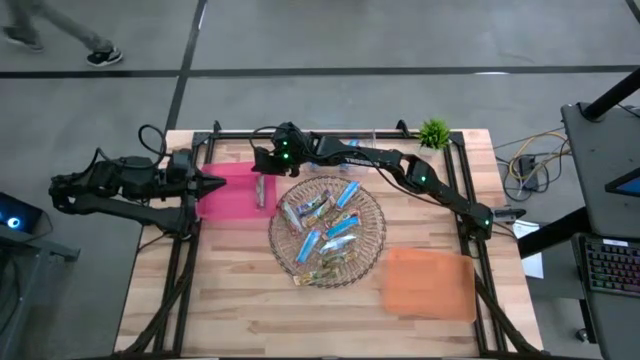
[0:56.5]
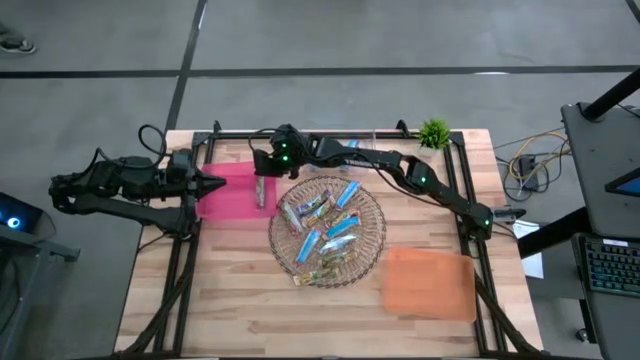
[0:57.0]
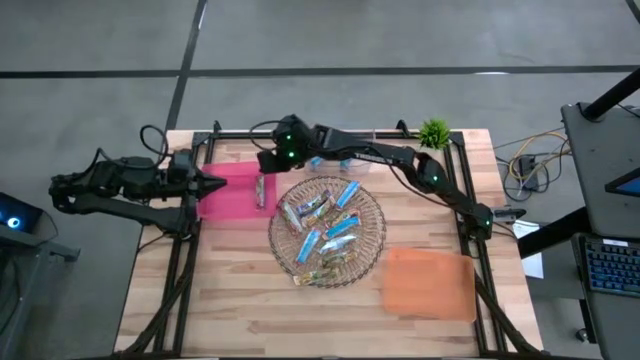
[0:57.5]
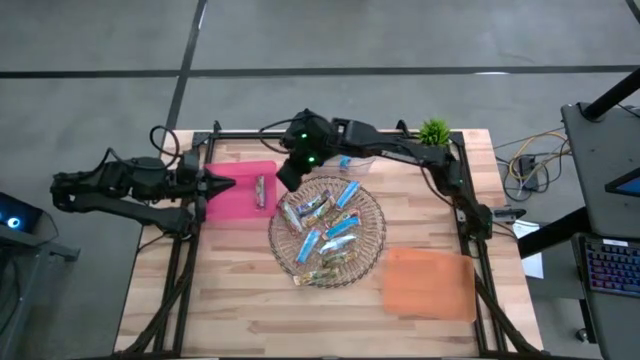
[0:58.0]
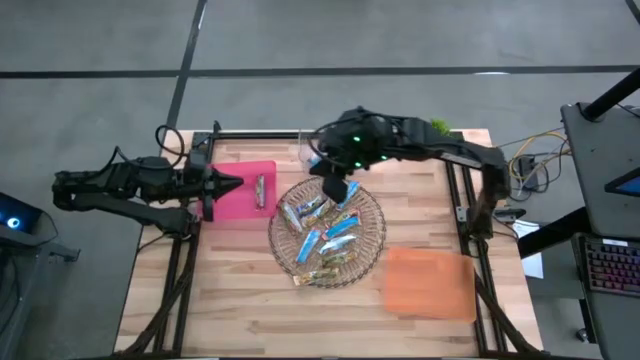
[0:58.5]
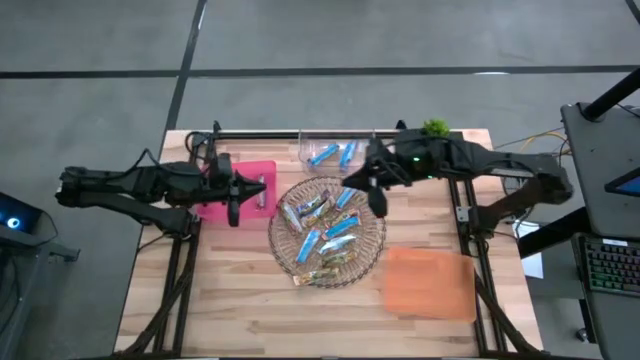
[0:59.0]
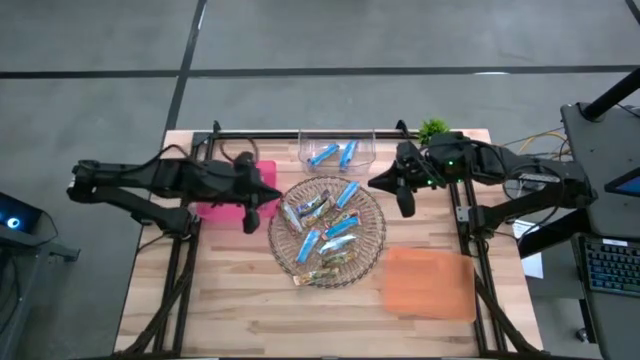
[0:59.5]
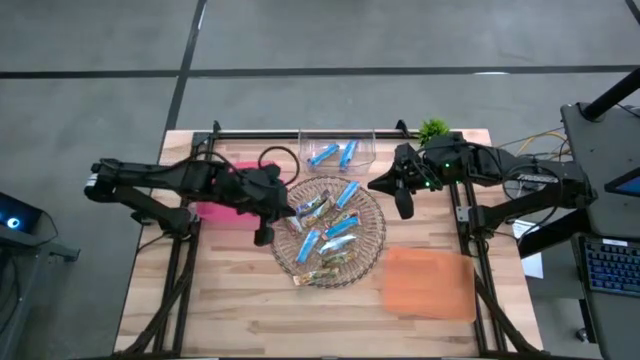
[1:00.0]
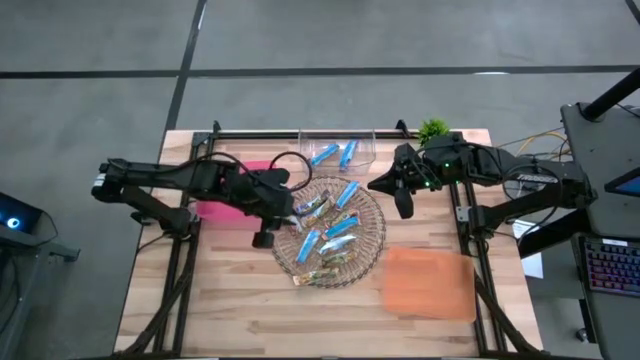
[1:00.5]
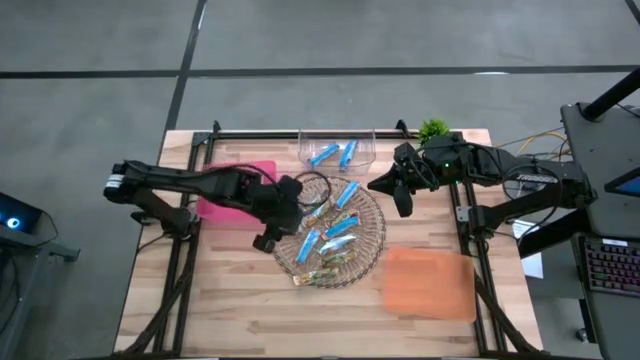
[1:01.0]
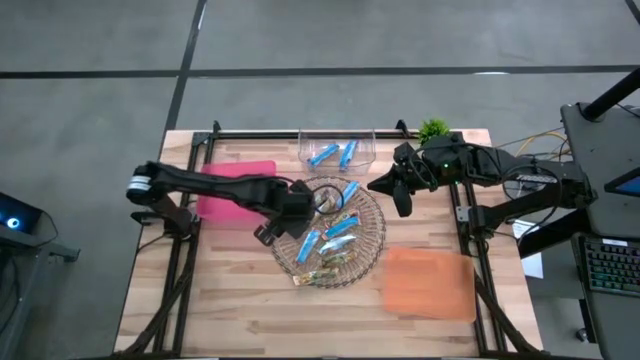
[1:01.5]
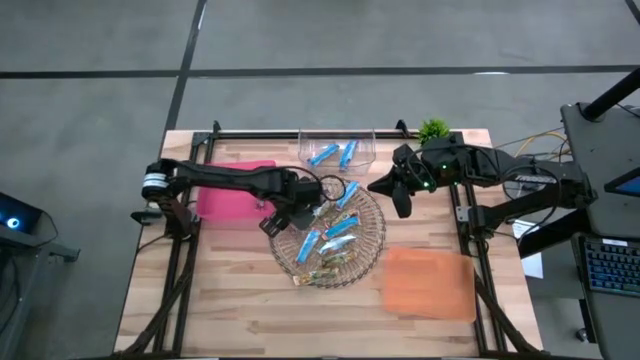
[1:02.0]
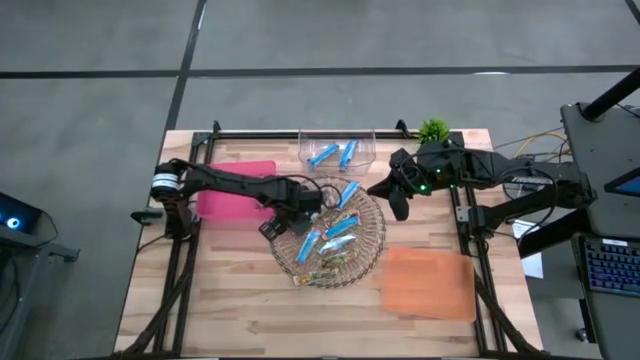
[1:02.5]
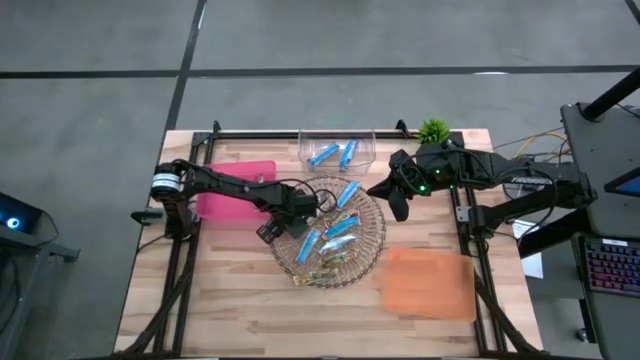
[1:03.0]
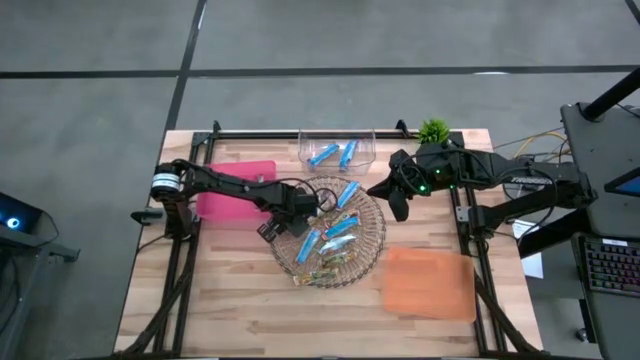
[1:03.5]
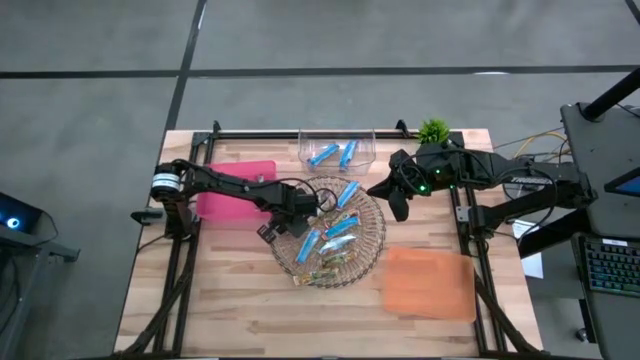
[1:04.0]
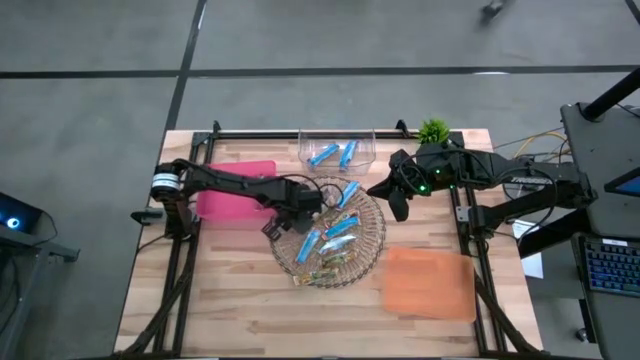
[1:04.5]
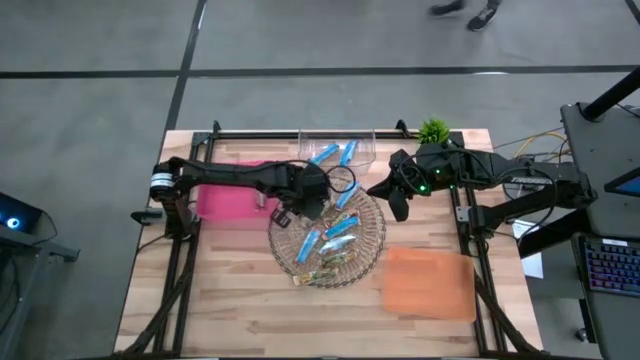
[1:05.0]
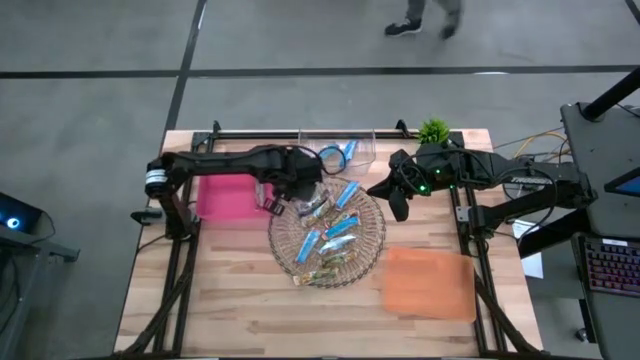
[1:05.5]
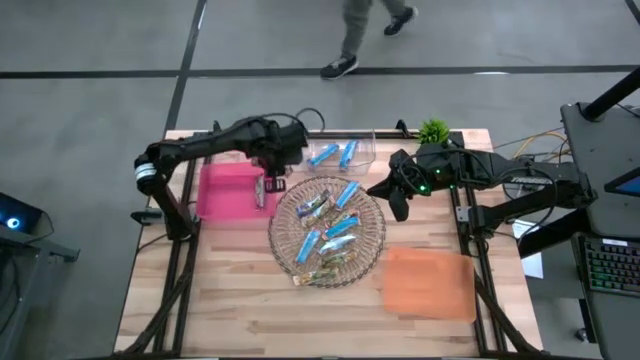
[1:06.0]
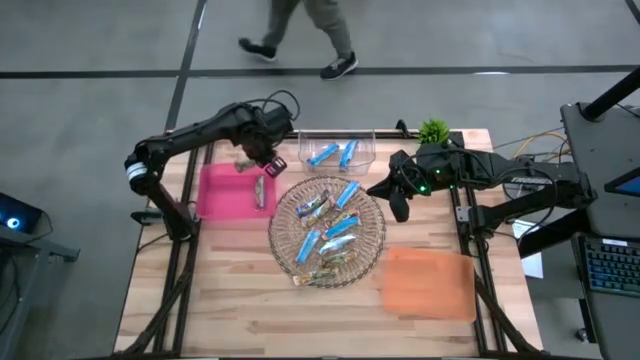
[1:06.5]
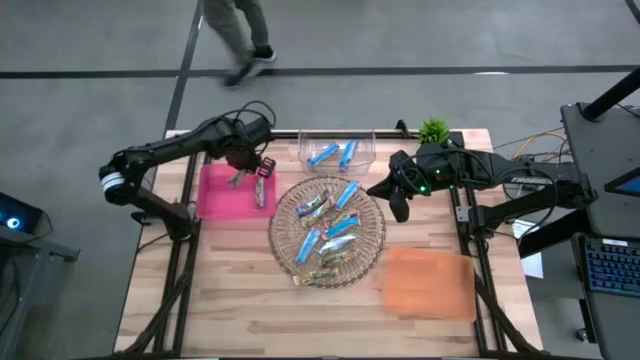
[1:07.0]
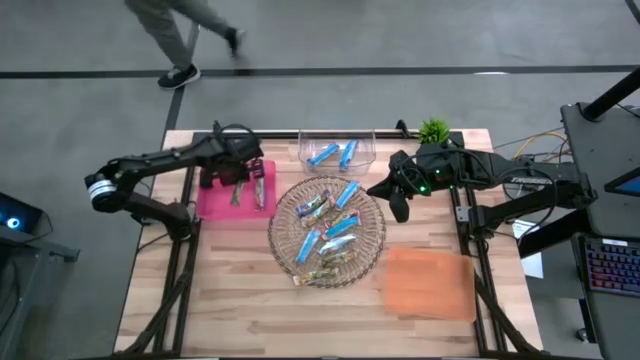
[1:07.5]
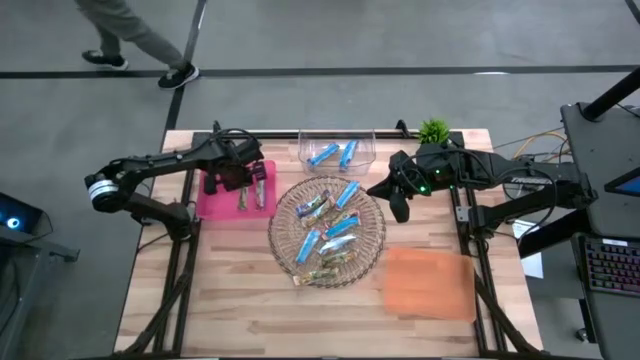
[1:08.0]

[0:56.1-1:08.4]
Task: Pick and place Granola Bars by type
Put the red granola bar into the red bin

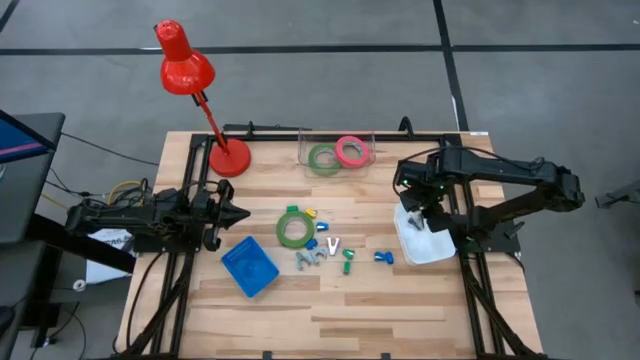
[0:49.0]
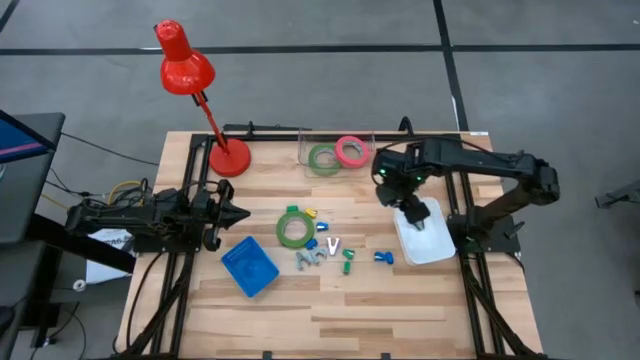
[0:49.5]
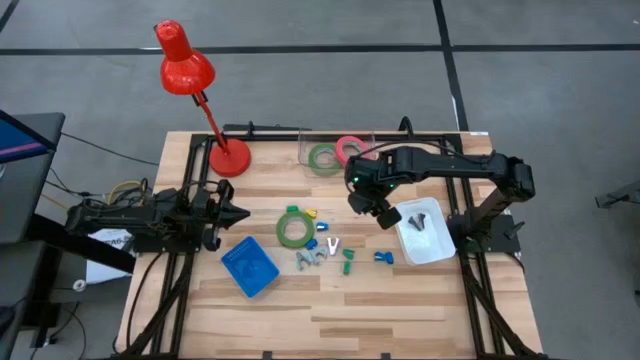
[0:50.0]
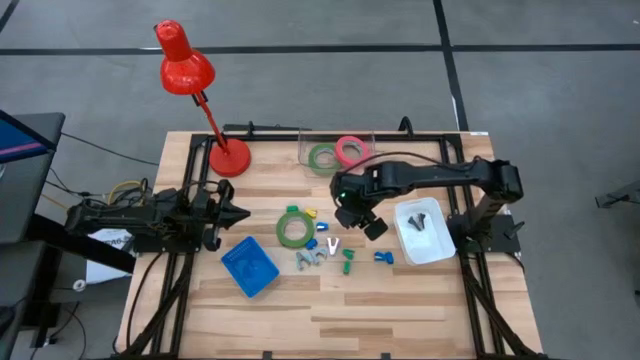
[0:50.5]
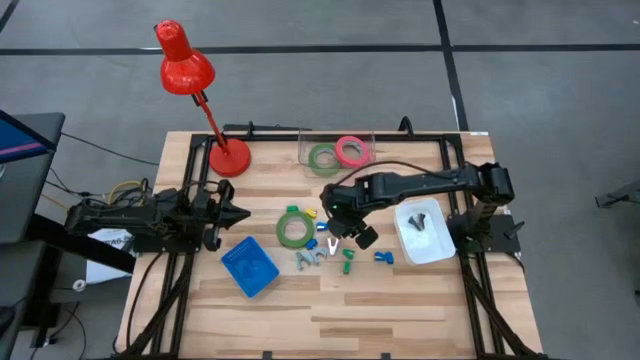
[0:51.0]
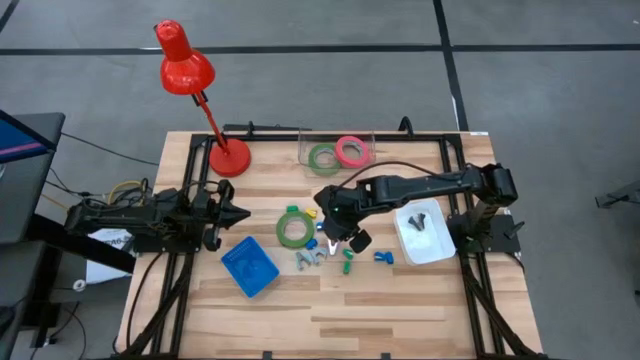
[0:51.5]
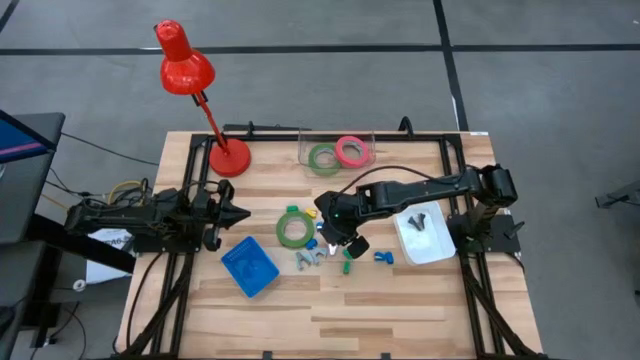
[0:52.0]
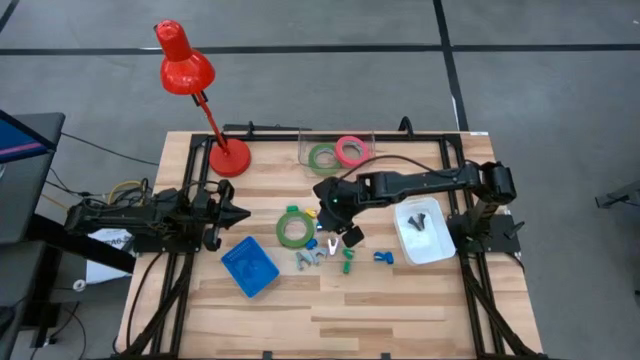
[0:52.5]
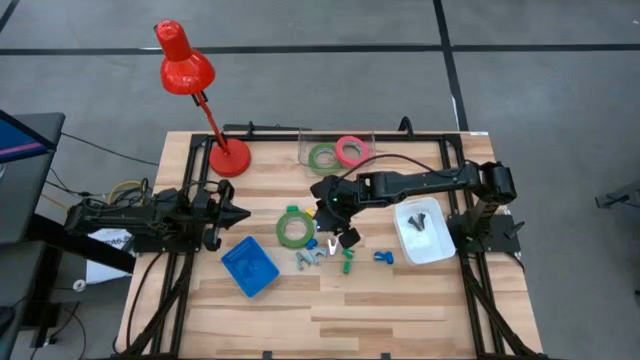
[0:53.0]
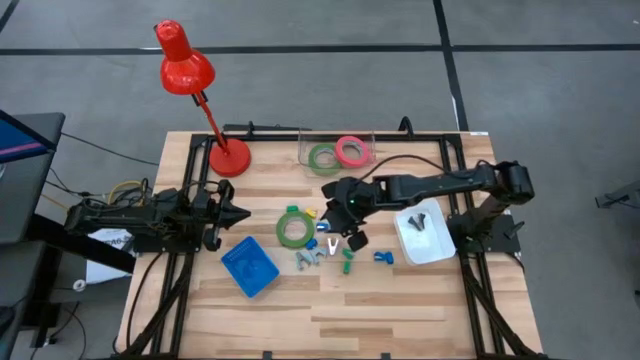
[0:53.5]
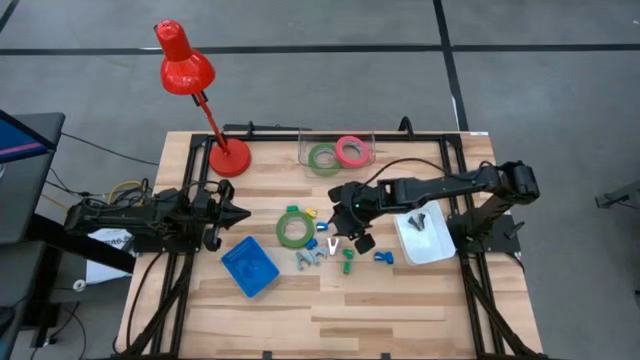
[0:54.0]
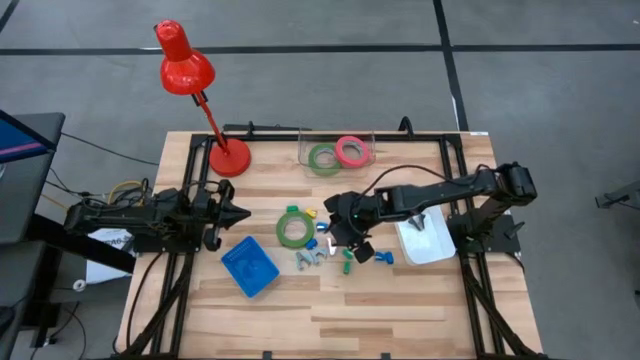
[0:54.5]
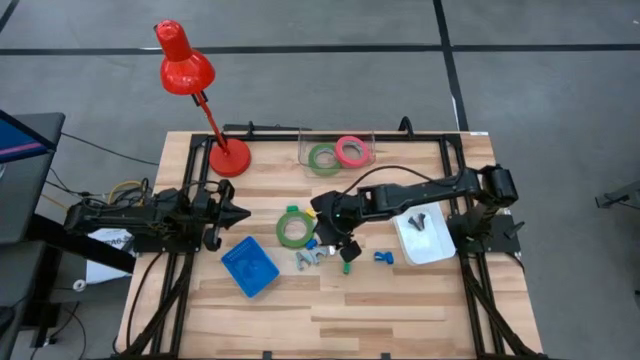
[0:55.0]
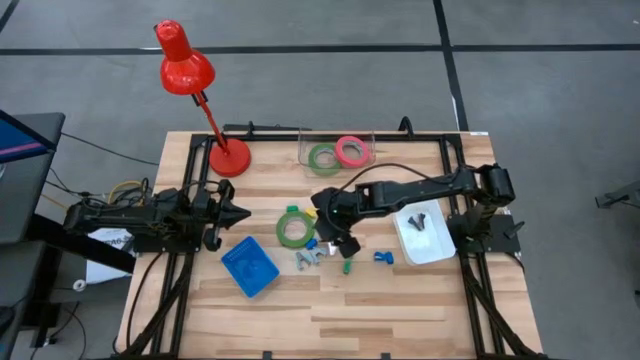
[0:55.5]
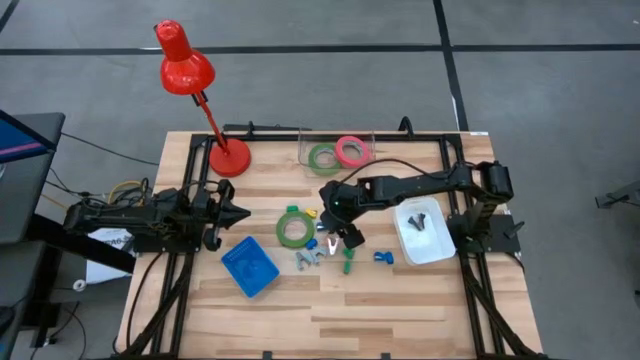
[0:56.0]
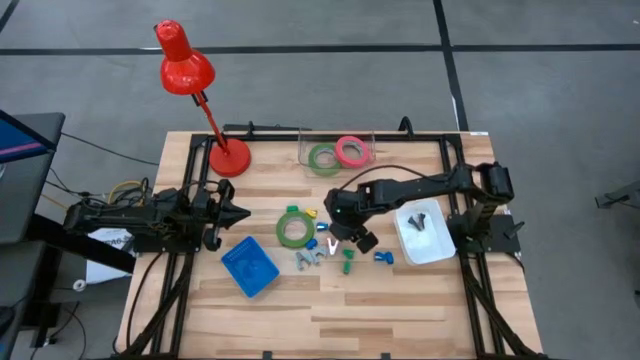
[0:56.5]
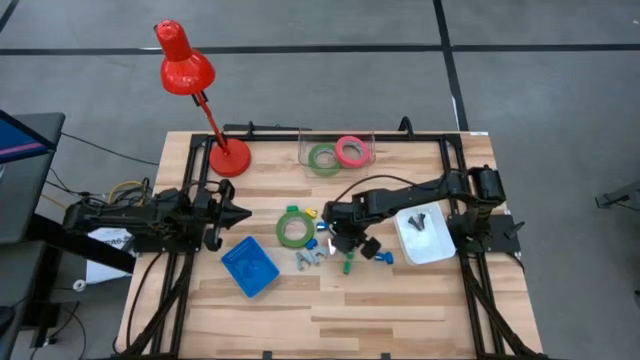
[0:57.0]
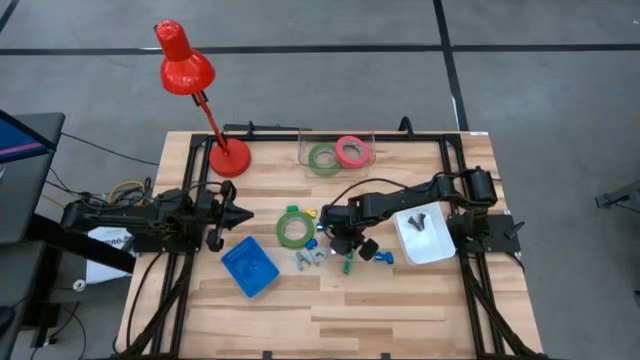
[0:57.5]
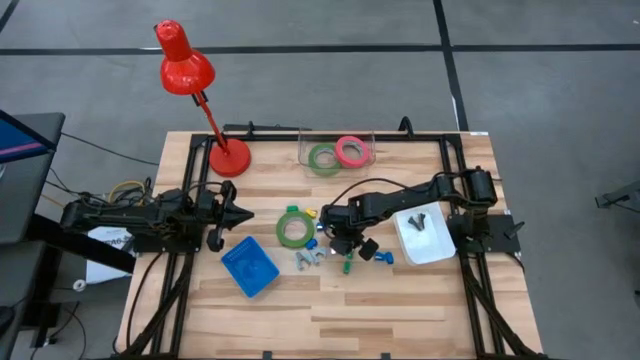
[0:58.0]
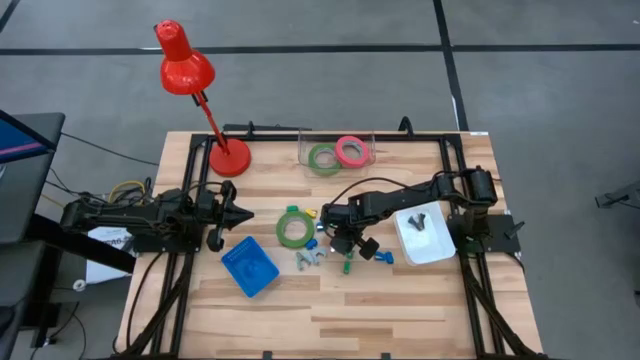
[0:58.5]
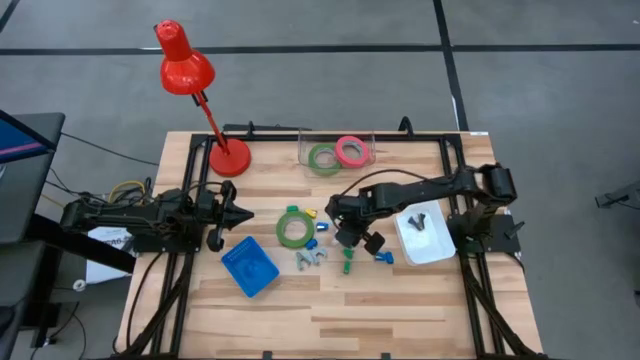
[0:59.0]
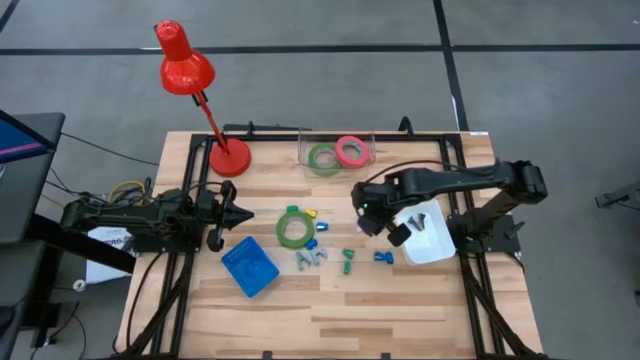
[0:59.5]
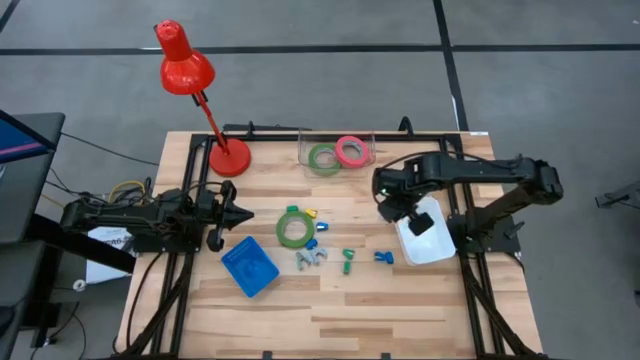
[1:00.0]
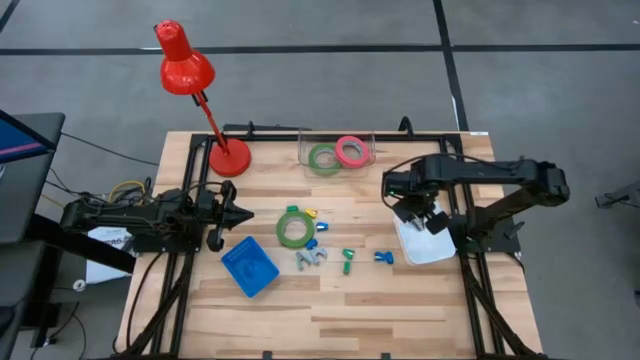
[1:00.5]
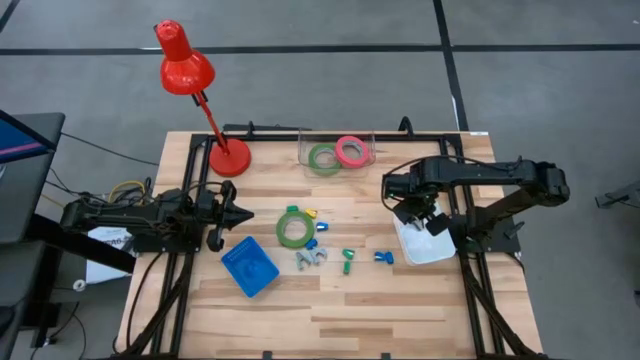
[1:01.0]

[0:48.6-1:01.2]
Task: Pick and place Stapler, Stapler remover, tape
Put the purple stapler remover into the white bin
